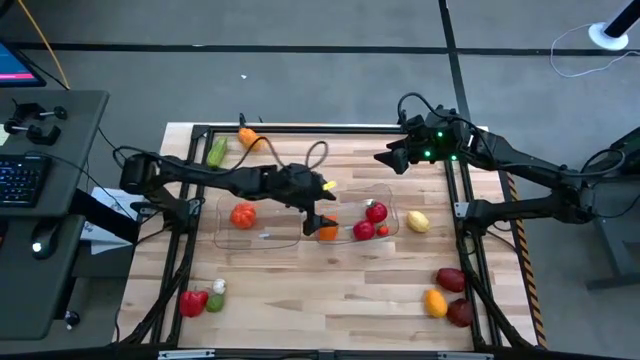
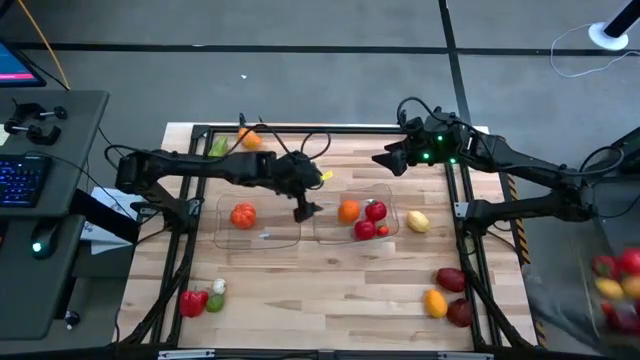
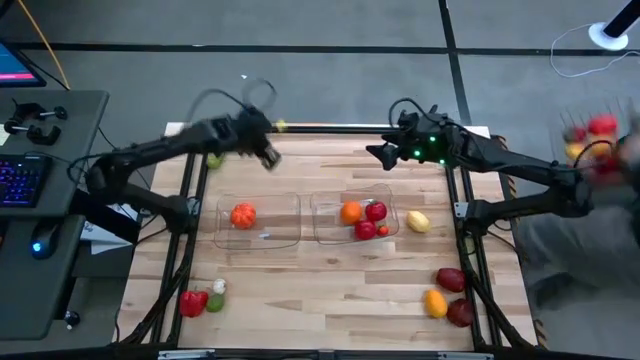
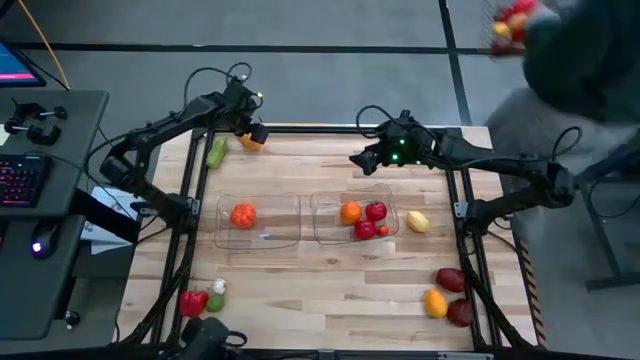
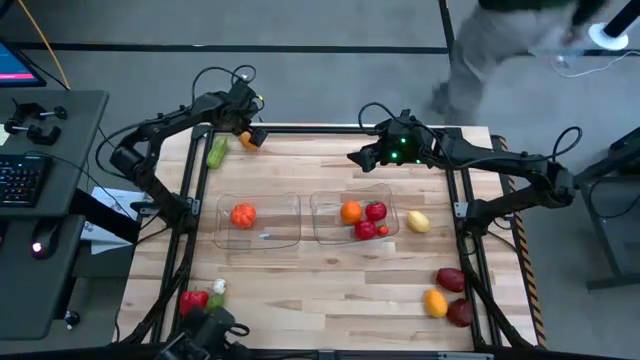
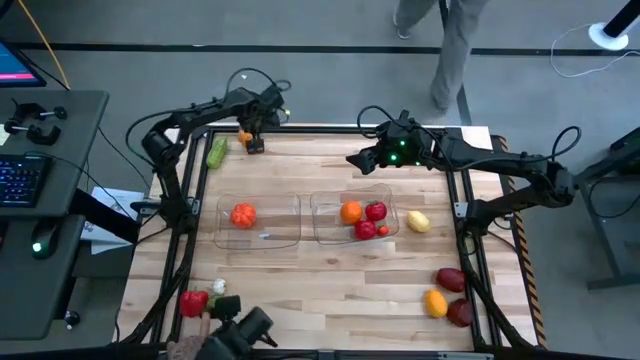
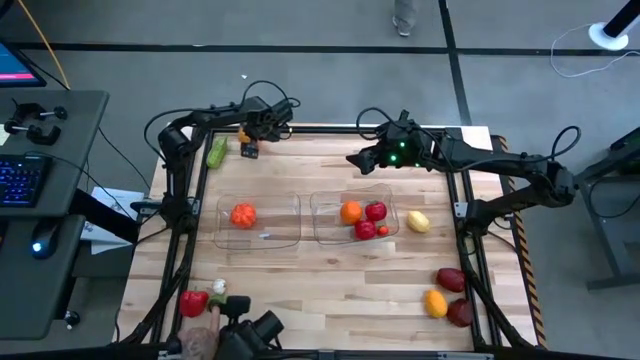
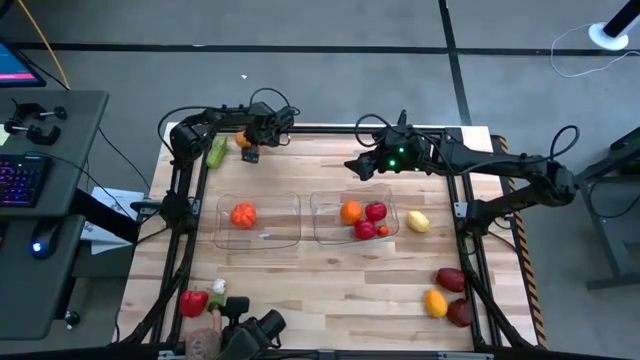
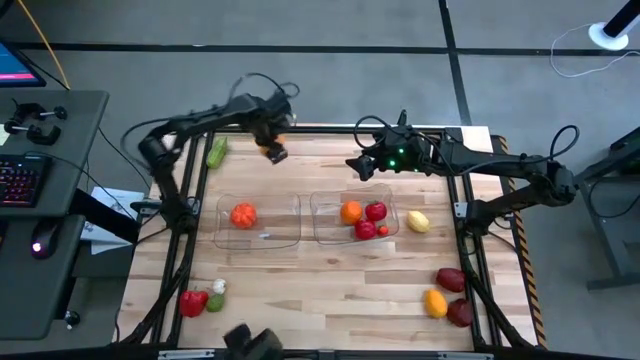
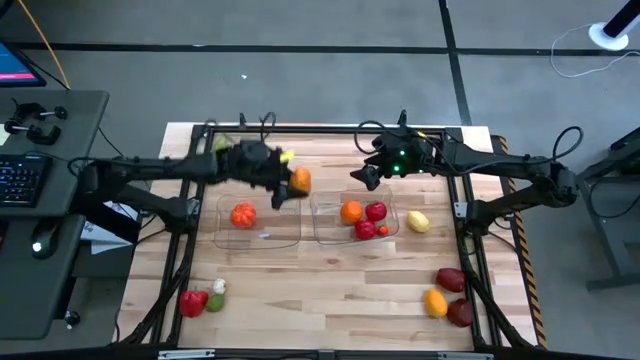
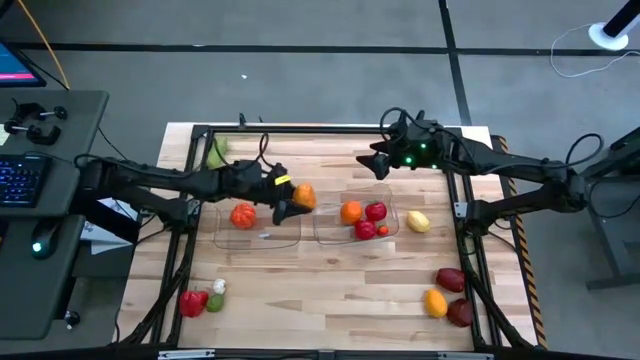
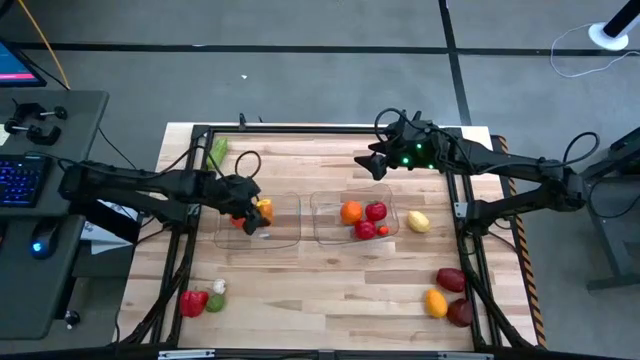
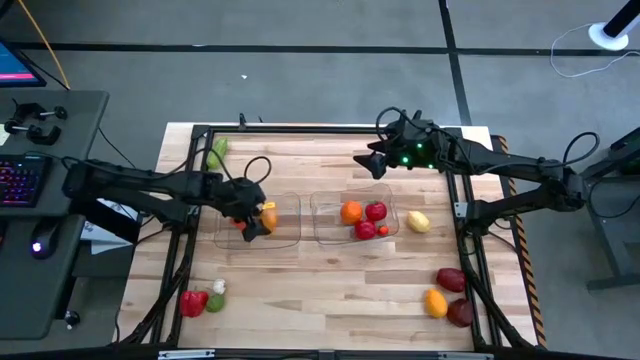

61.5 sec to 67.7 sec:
Task: Sort produce into baskets
Put the top brown potato into the left transparent bin

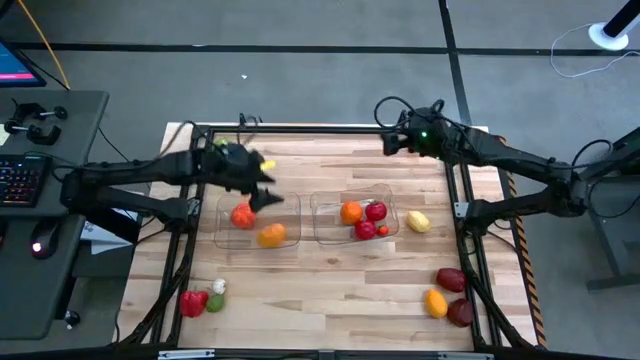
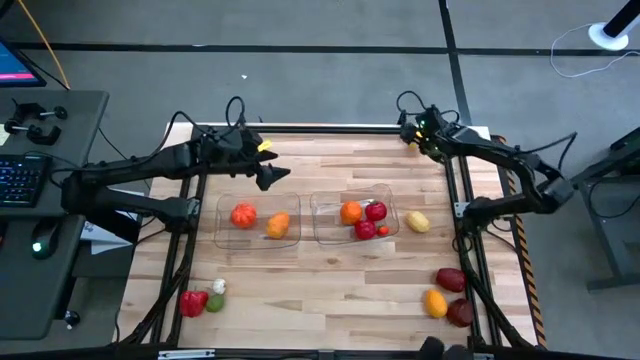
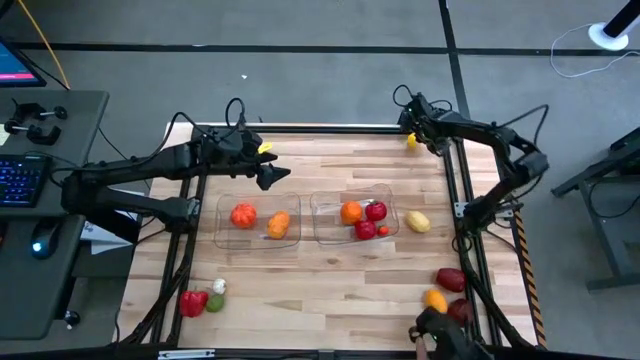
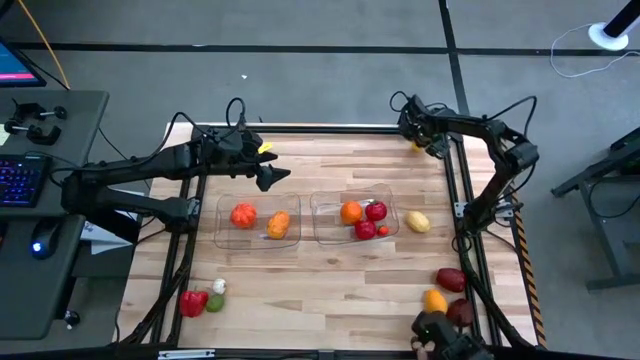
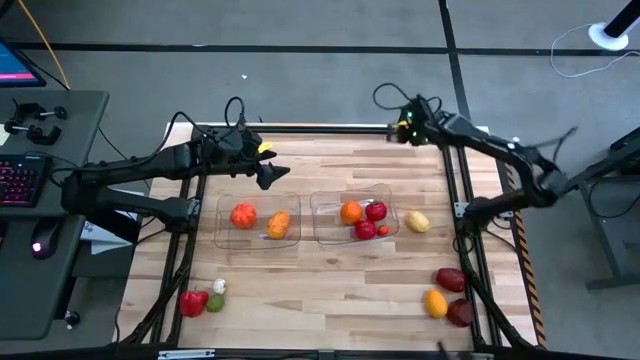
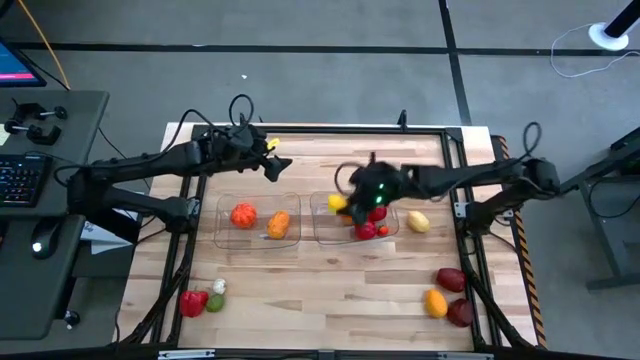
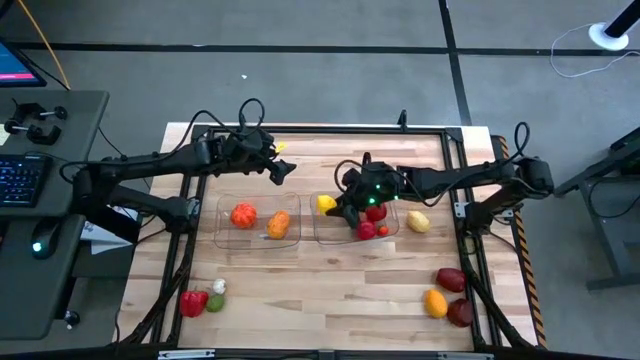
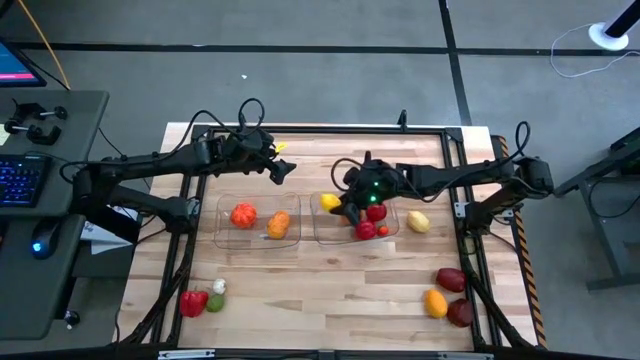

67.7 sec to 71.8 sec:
Put the top yellow lemon into the right transparent bin

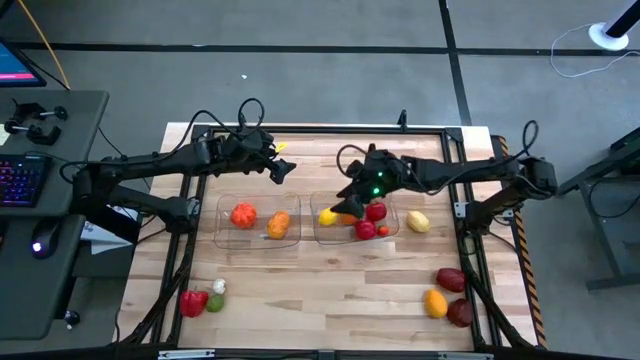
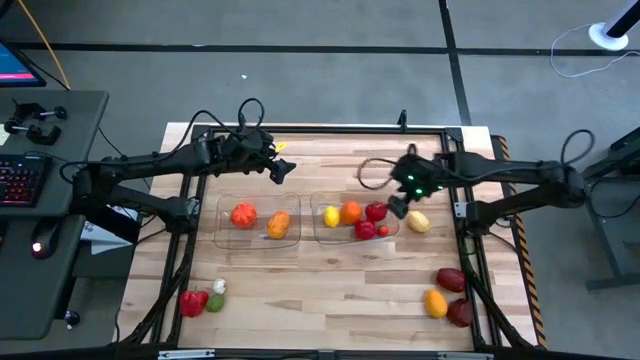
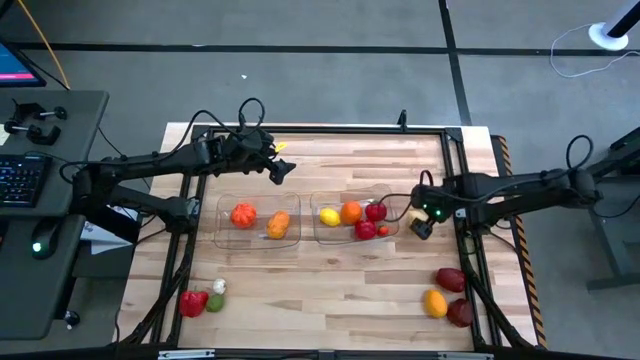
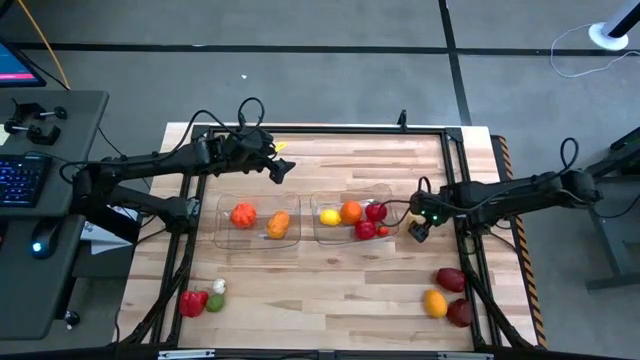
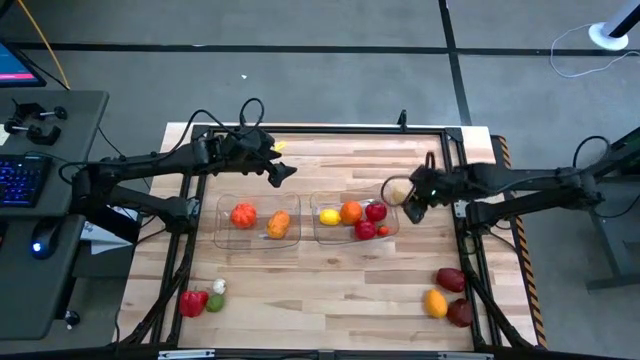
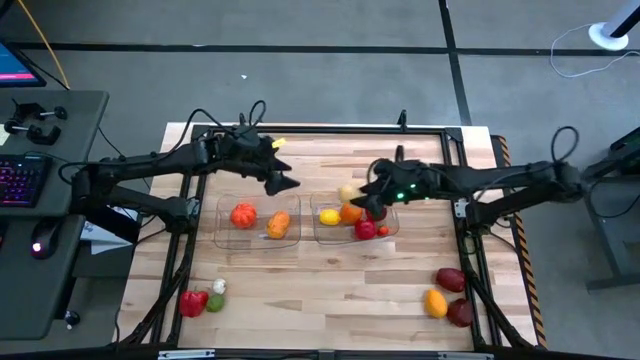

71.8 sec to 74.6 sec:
Put the brown potato into the right transparent bin

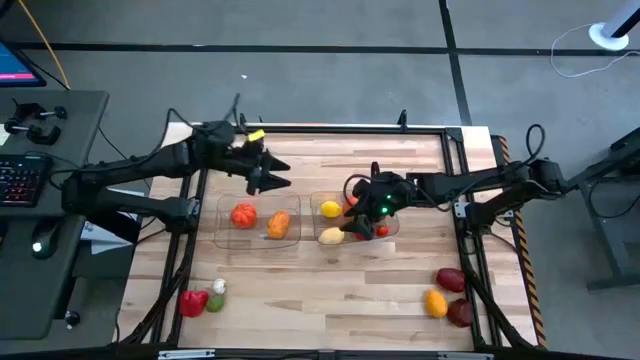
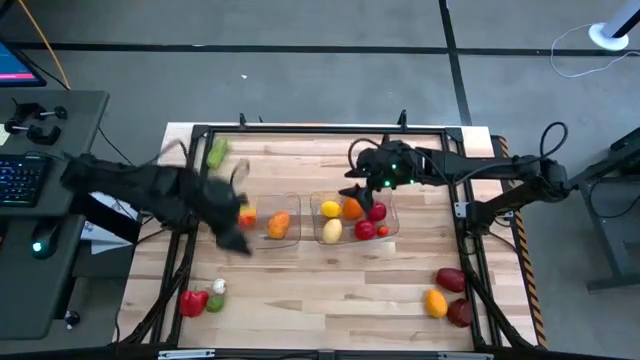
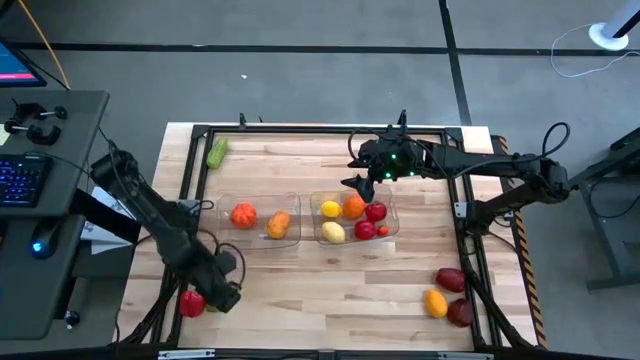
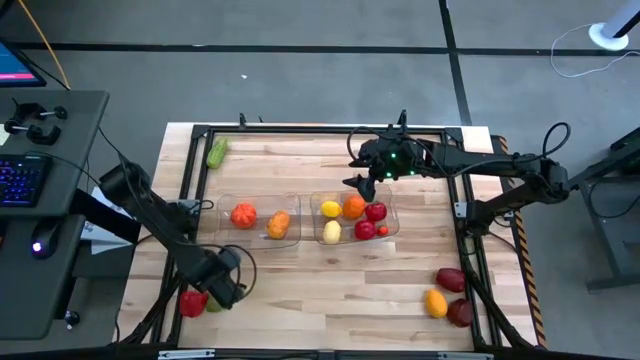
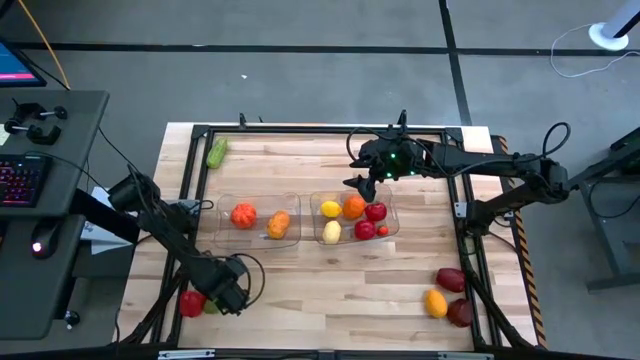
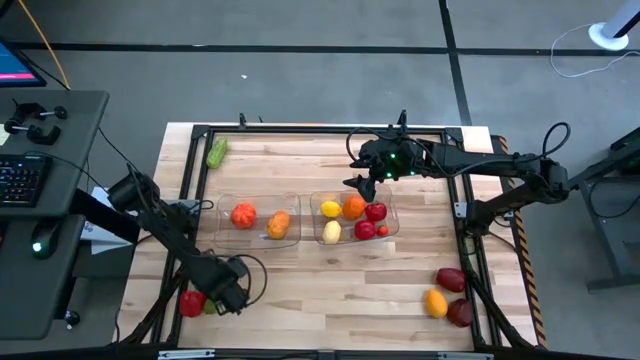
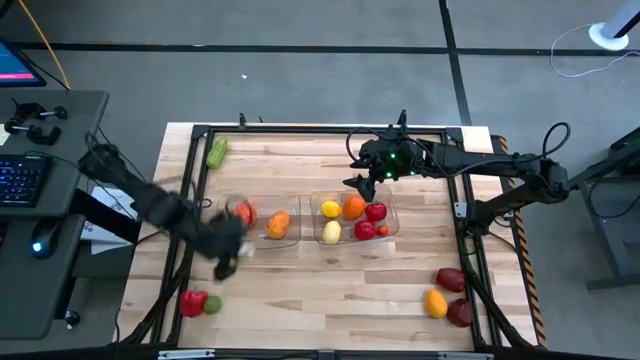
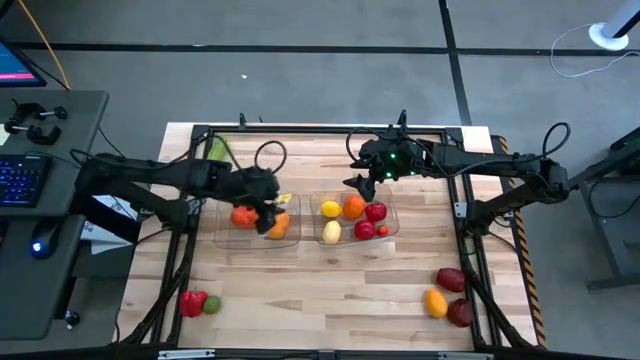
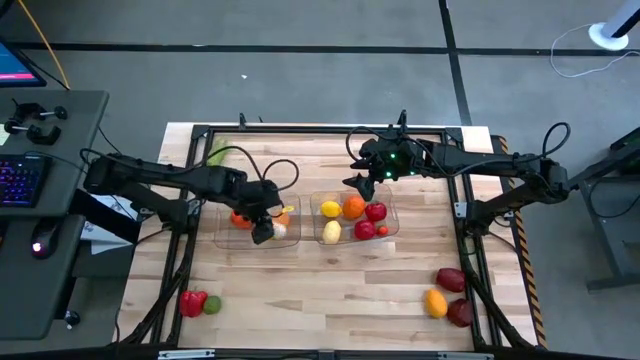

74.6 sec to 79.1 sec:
Put the white garlic into the left transparent bin

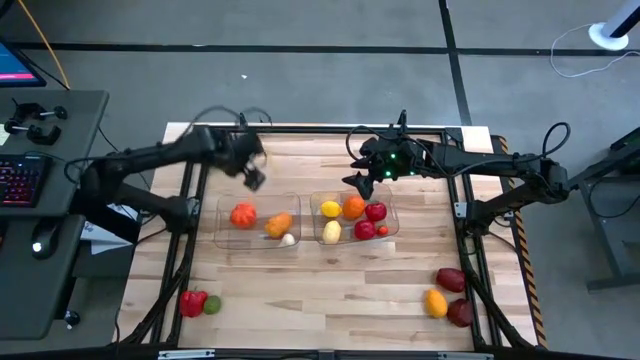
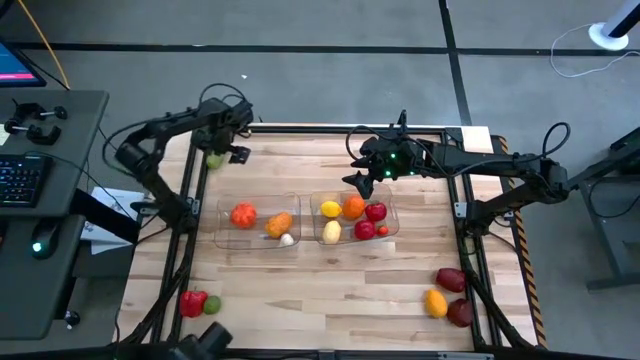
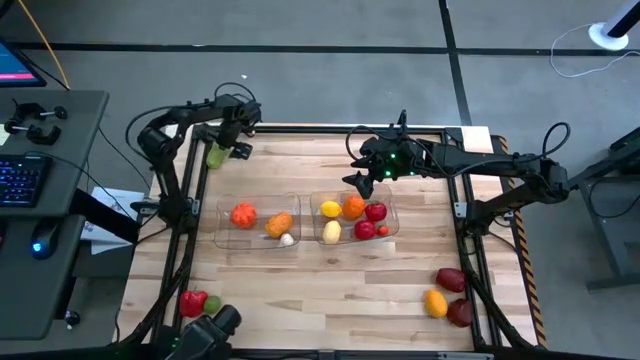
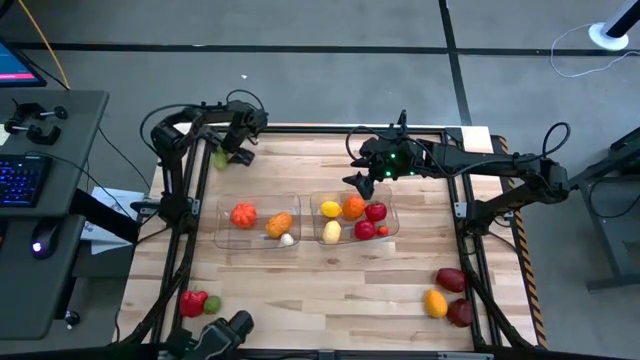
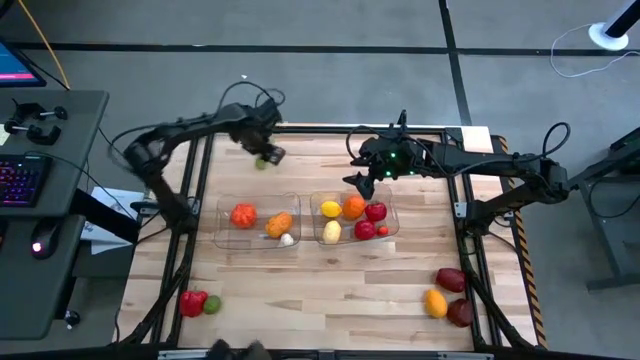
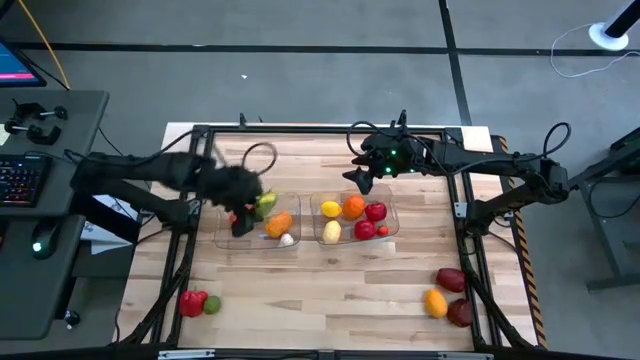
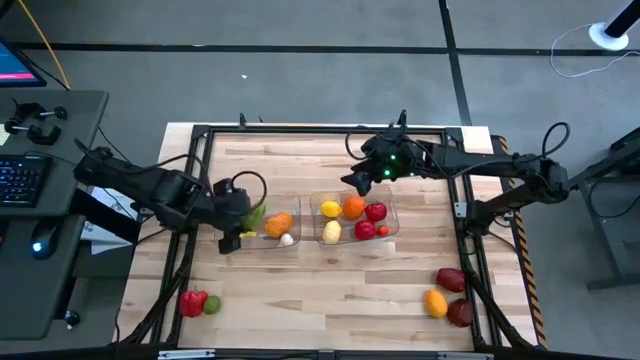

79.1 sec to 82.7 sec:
Put the green cucumber into the left transparent bin
